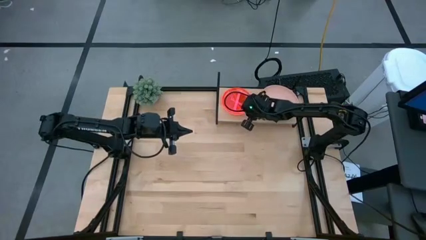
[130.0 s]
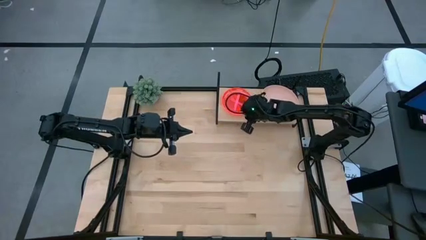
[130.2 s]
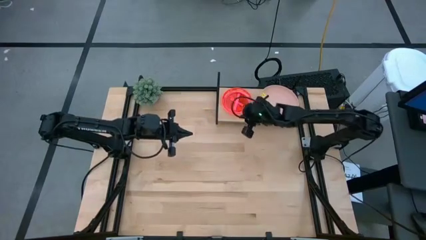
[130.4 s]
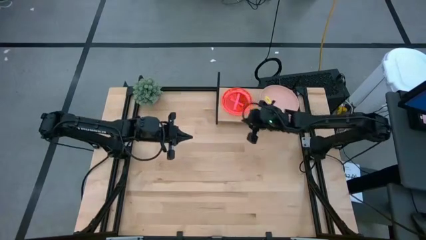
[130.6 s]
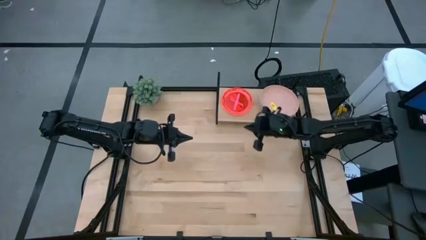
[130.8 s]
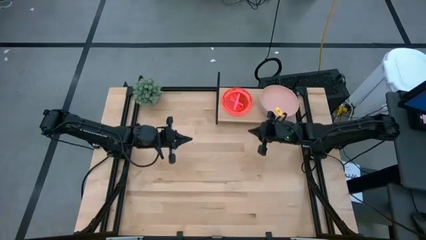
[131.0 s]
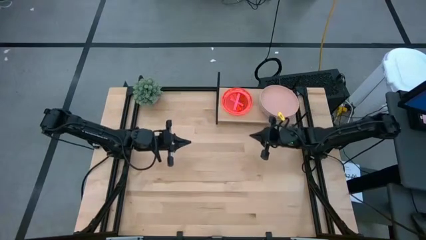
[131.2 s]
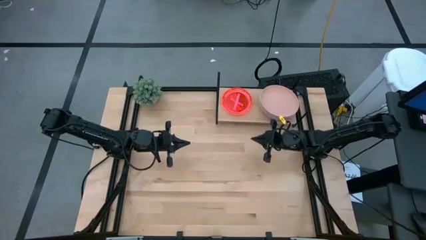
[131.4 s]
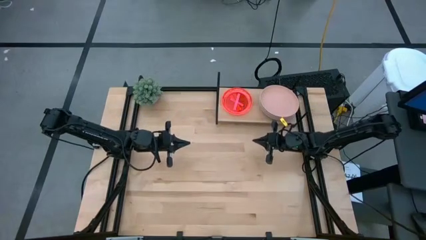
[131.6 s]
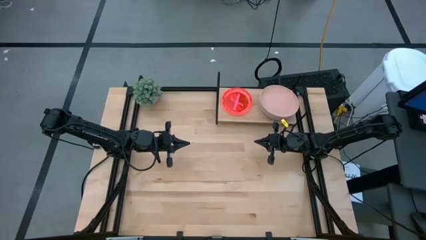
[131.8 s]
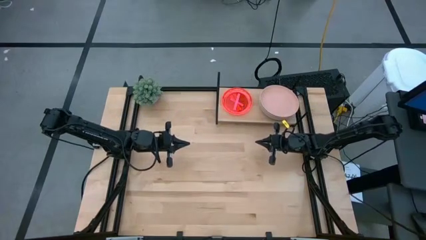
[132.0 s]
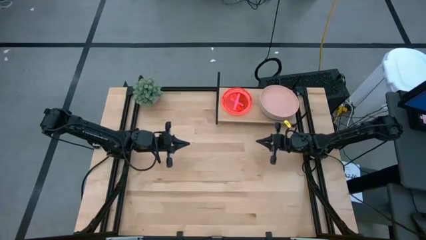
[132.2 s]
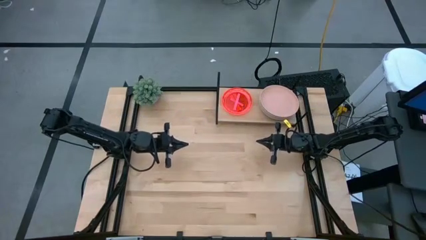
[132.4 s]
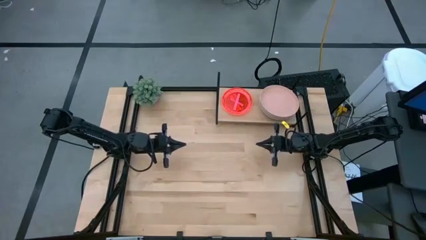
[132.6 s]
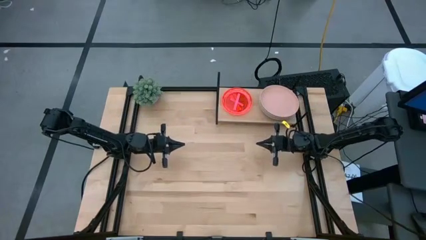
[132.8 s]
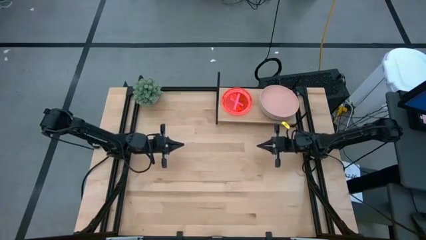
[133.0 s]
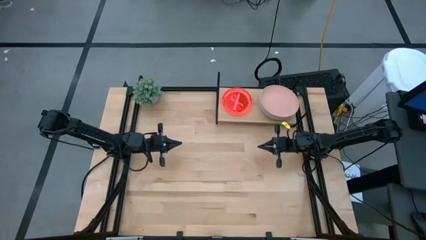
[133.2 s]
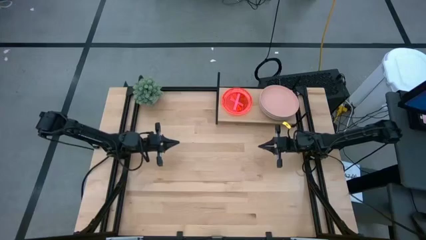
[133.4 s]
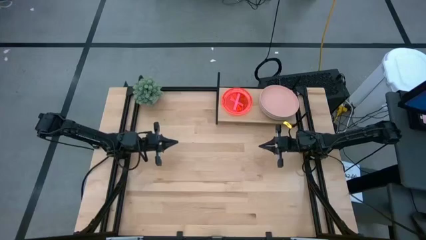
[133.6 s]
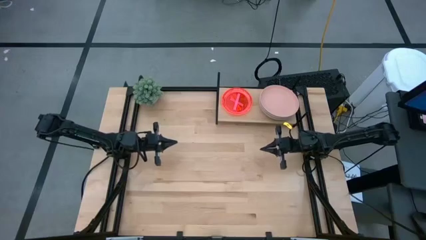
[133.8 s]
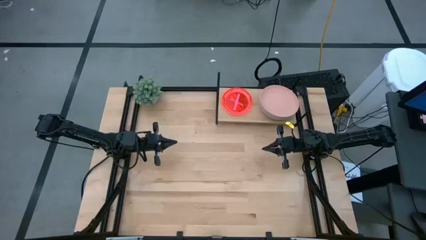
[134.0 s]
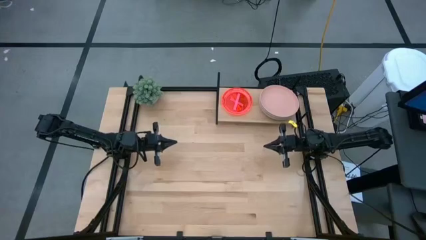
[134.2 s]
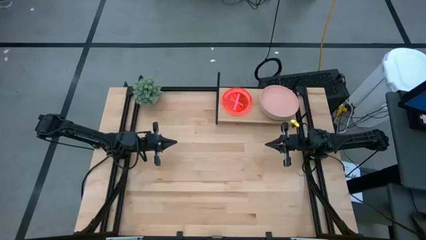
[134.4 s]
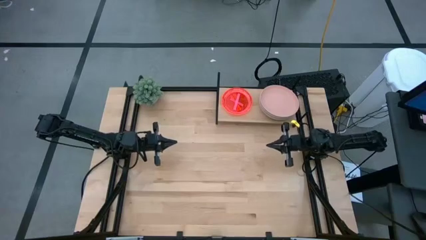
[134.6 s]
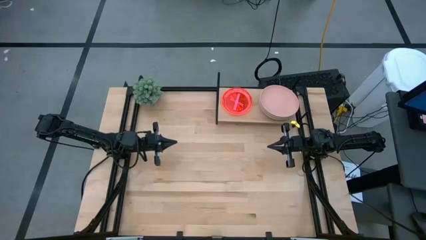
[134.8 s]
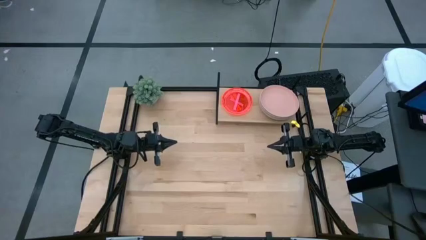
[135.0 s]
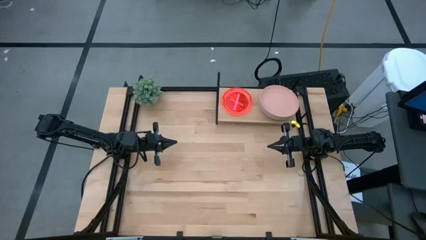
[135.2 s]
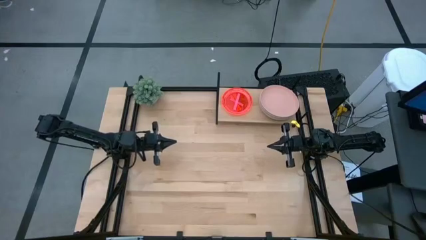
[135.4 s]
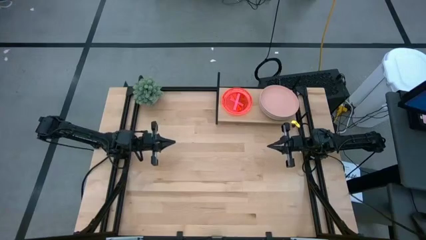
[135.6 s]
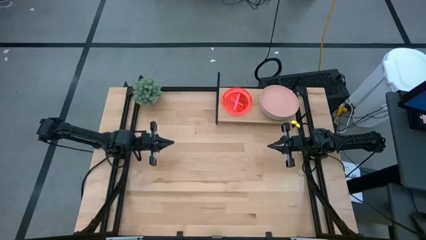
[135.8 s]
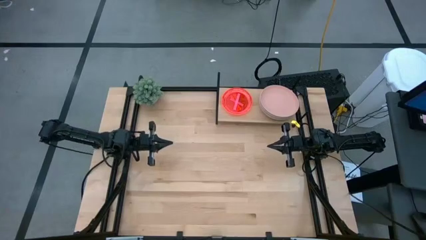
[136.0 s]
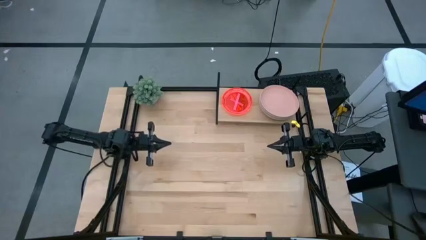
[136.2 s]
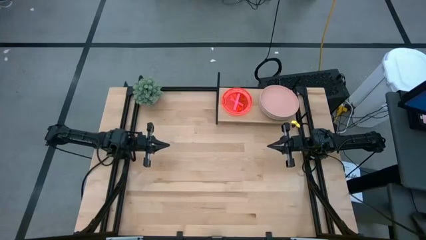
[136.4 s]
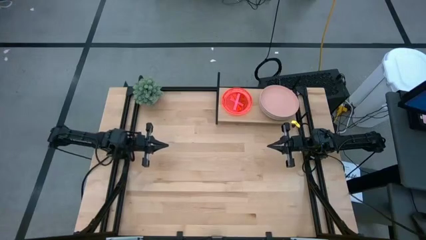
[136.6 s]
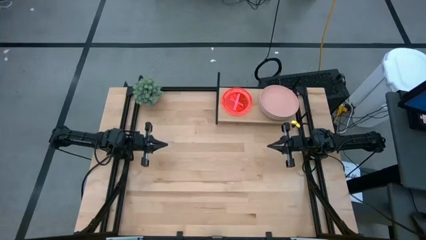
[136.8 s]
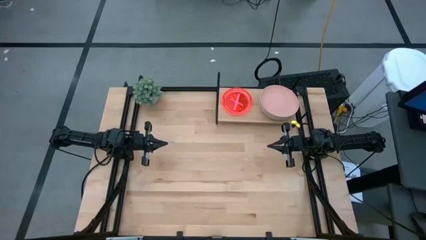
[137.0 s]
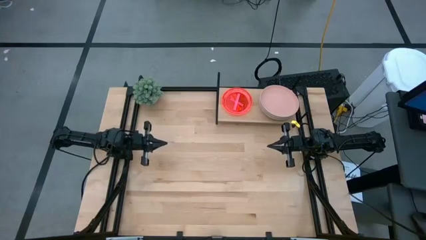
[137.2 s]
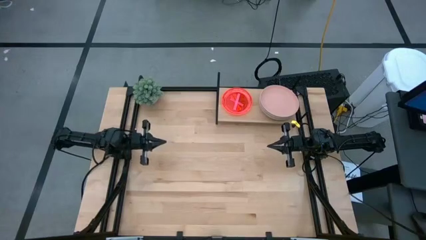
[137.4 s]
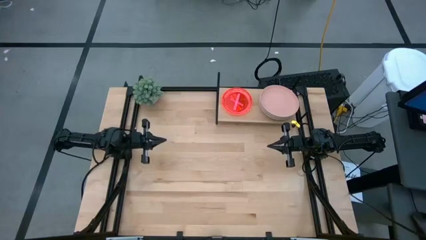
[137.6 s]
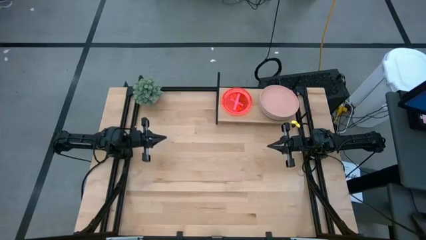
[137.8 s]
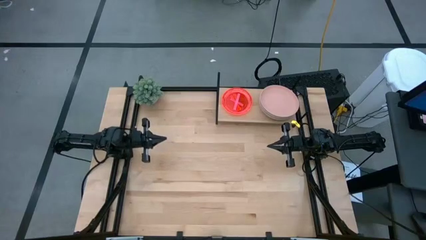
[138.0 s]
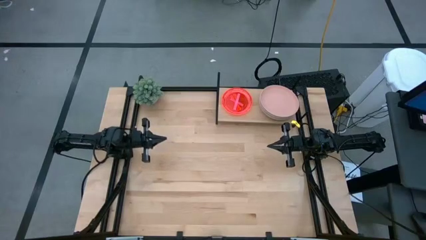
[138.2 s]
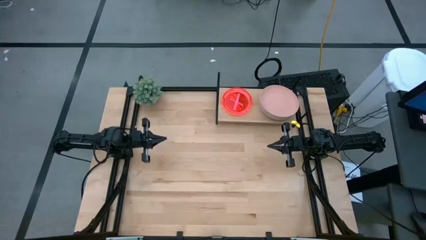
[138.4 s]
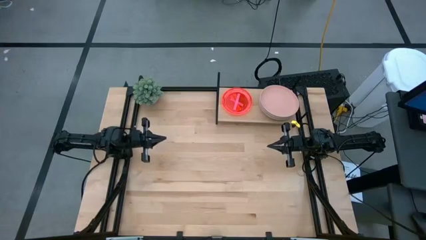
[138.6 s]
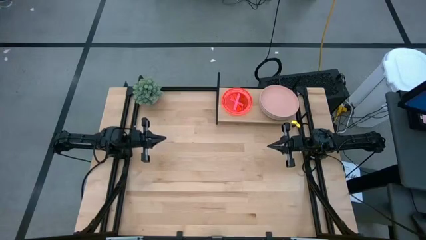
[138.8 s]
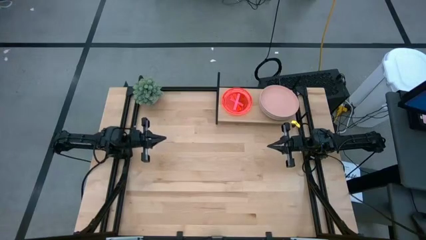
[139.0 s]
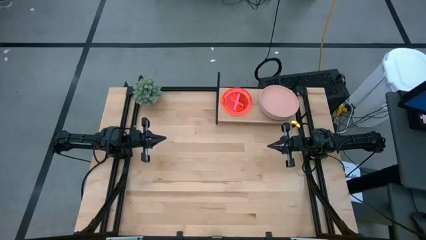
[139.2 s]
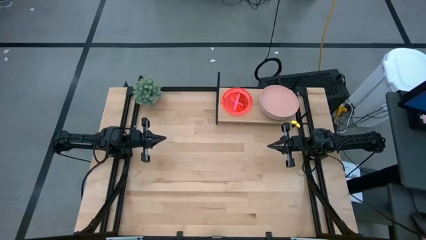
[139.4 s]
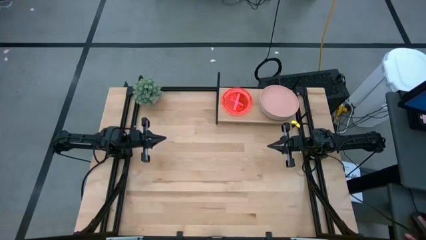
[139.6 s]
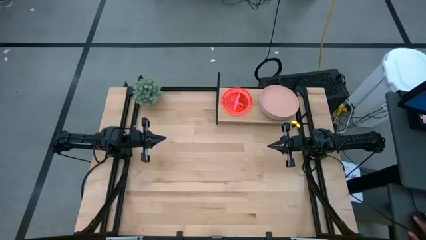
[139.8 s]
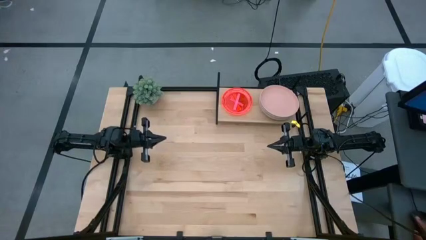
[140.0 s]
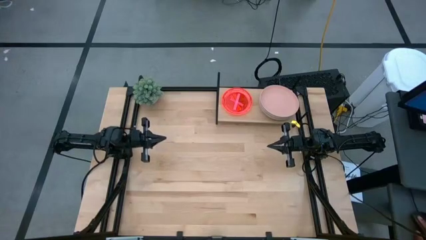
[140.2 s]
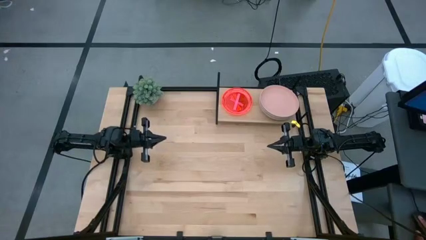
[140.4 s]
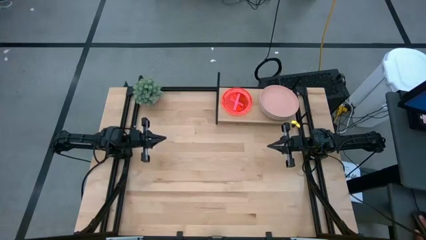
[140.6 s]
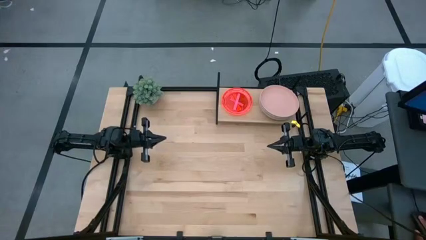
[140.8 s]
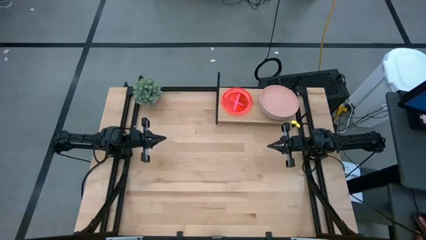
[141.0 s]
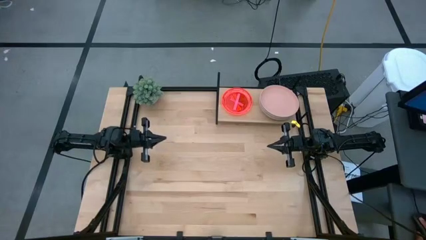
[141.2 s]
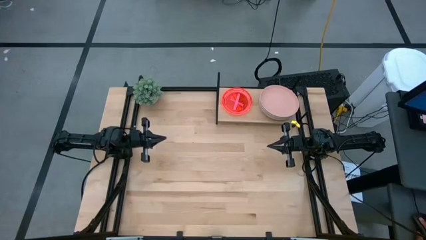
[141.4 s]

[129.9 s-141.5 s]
Task: Place and stack plates onto a shelf
Return to Home Position

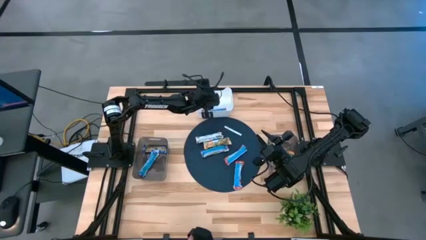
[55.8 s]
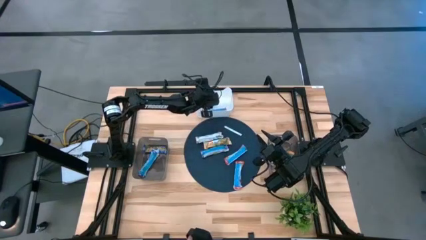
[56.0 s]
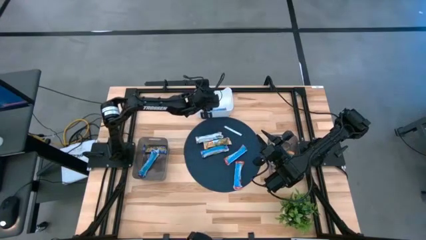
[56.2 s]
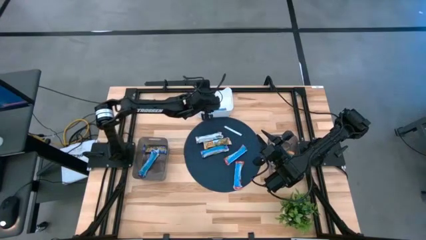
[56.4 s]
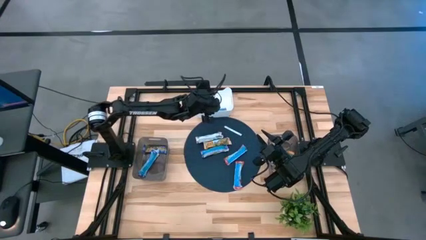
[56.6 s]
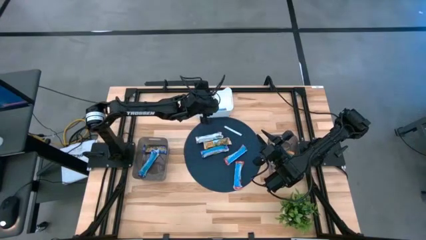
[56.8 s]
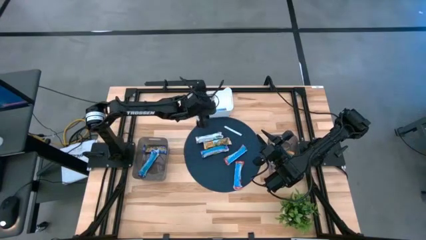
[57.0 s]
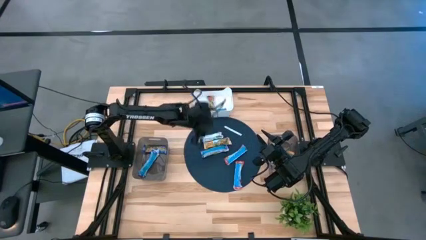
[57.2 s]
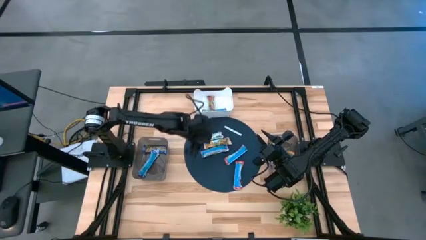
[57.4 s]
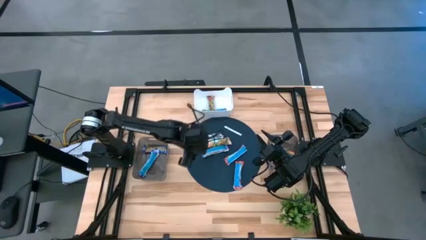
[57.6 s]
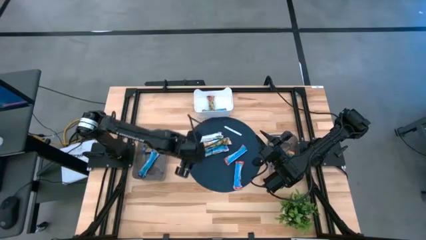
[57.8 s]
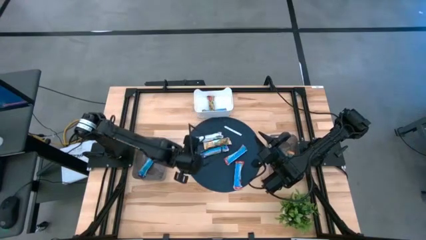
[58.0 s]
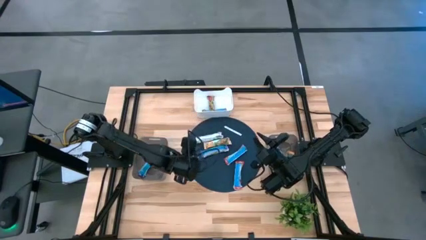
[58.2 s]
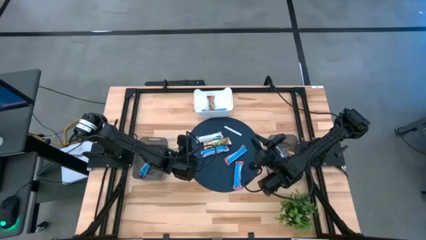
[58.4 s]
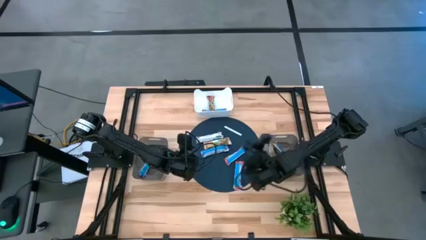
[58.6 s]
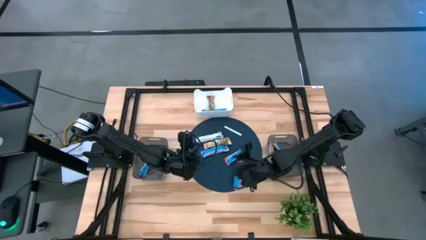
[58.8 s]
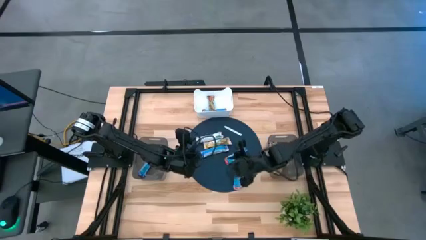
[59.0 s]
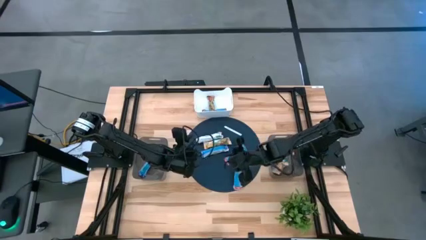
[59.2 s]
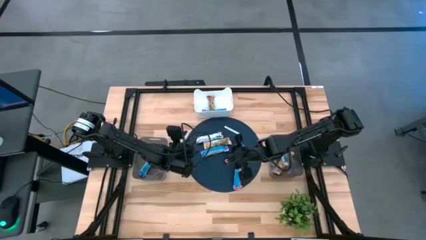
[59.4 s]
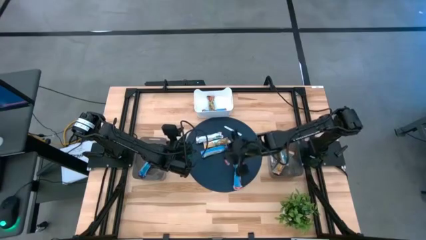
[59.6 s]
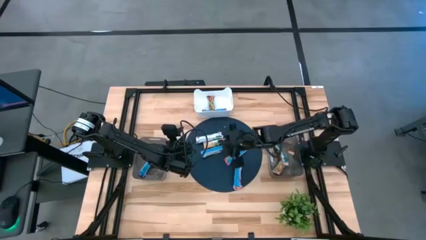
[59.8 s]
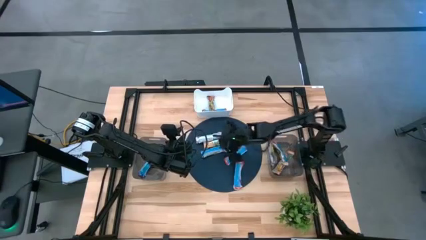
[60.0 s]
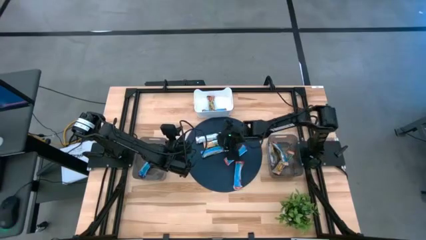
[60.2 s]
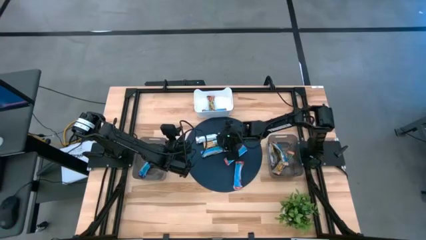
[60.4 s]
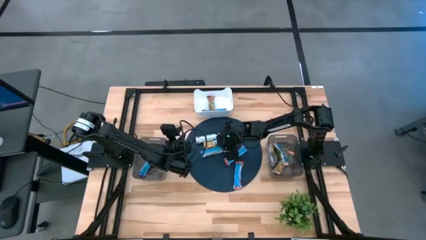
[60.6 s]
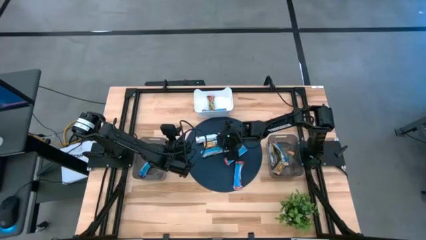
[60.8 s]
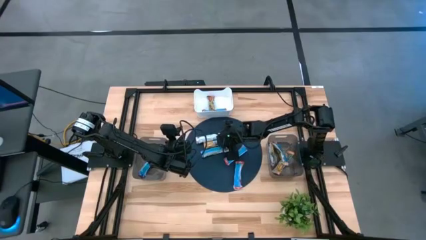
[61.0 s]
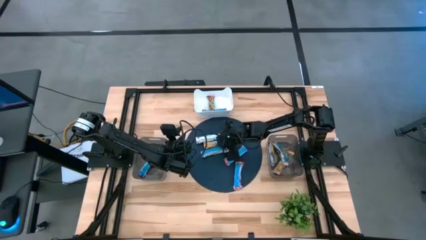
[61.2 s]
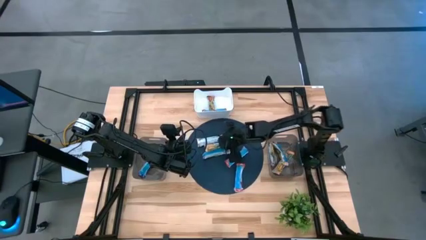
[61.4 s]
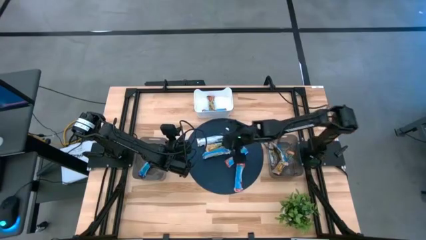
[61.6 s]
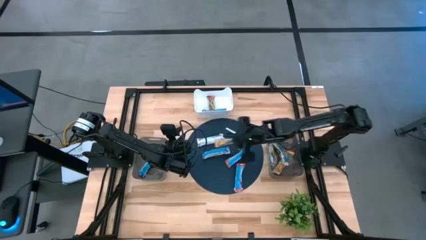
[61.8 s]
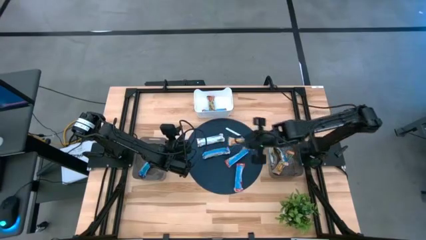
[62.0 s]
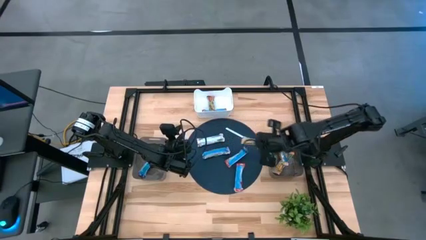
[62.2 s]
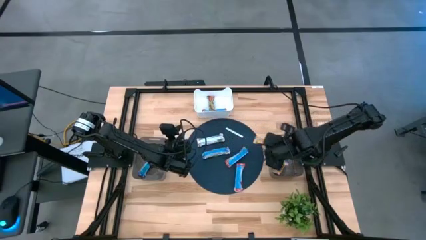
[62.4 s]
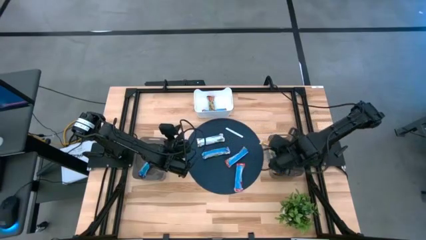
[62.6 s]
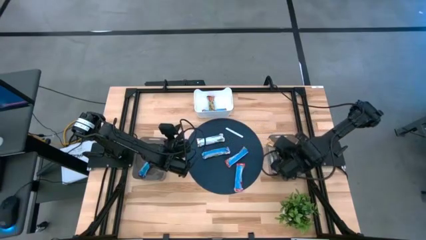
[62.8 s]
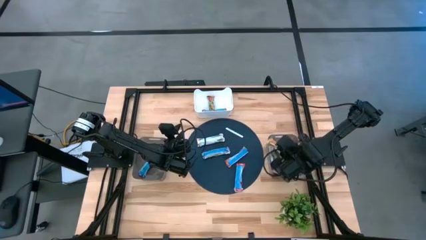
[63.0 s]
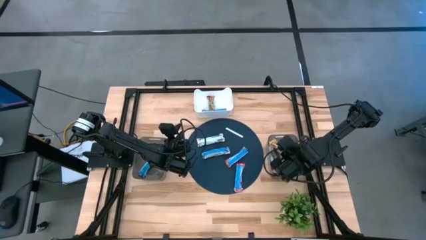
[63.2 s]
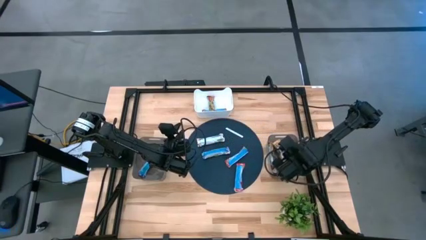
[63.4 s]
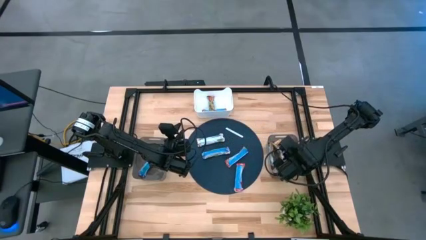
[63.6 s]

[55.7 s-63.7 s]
Task: Pick and place Granola Bars by type
Put the orange granola bar into the right black bin
